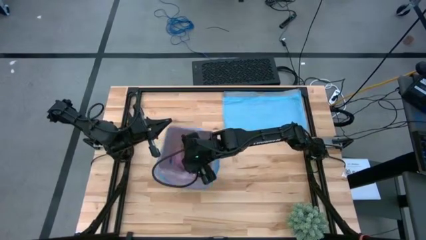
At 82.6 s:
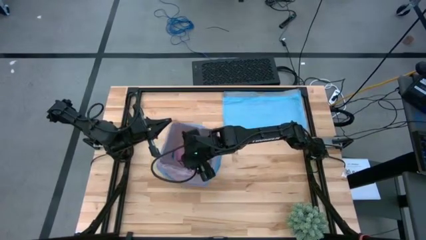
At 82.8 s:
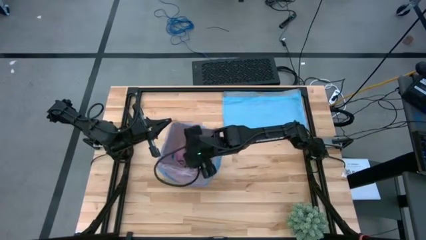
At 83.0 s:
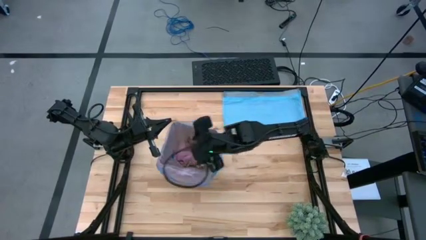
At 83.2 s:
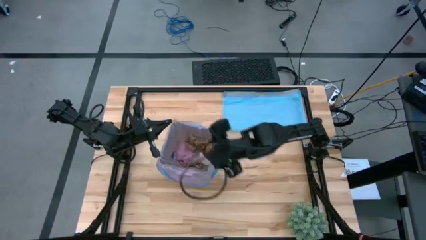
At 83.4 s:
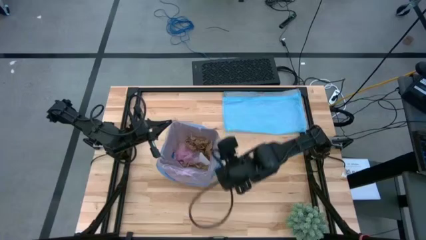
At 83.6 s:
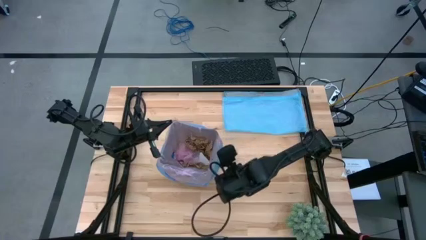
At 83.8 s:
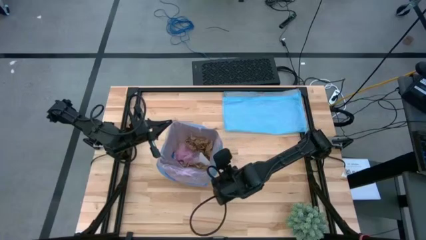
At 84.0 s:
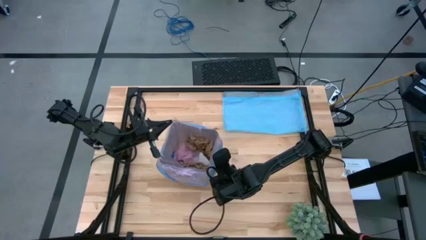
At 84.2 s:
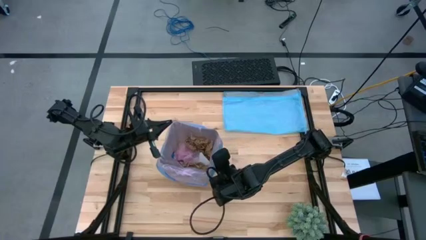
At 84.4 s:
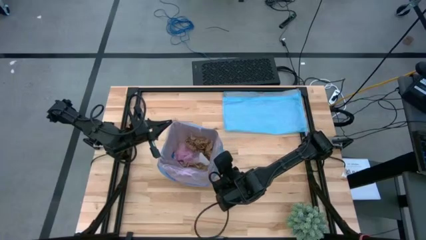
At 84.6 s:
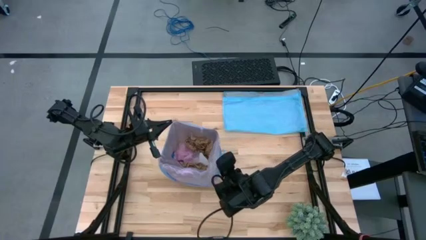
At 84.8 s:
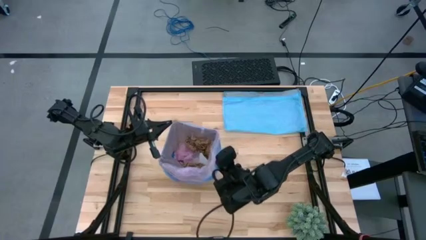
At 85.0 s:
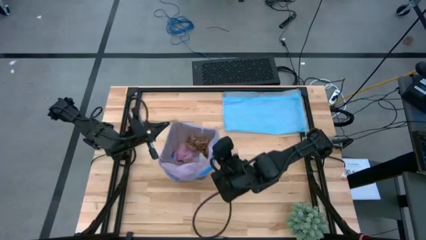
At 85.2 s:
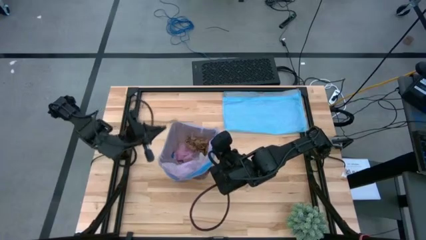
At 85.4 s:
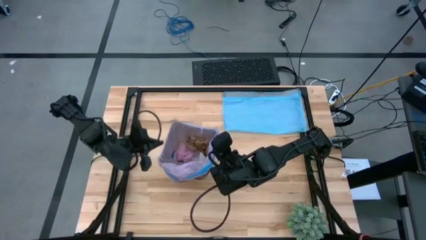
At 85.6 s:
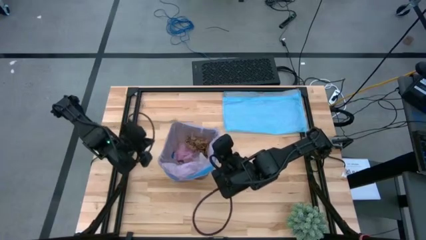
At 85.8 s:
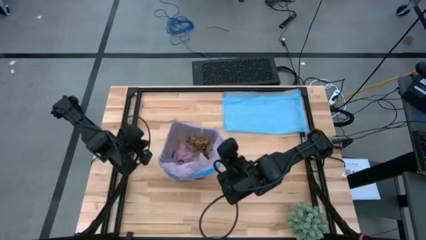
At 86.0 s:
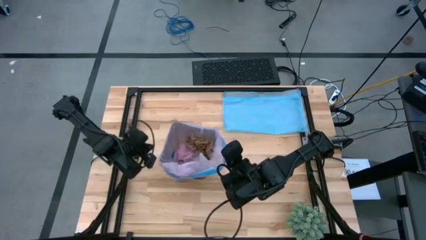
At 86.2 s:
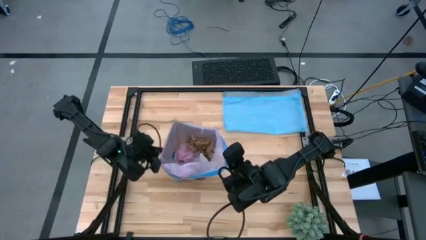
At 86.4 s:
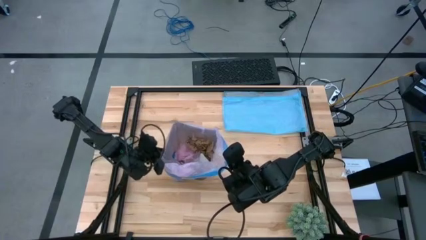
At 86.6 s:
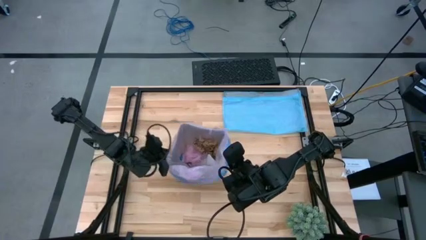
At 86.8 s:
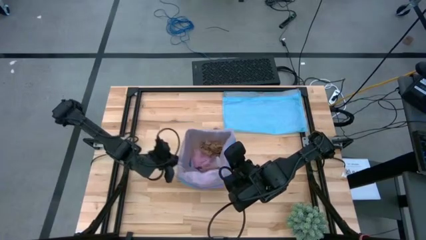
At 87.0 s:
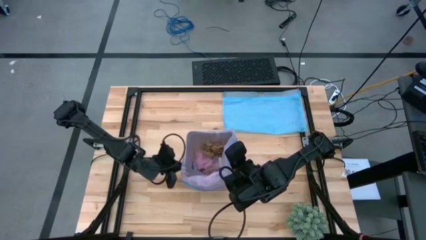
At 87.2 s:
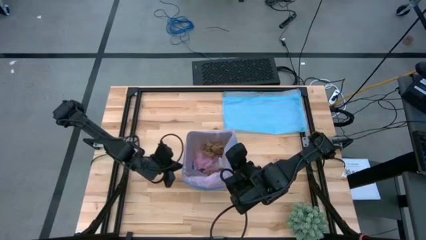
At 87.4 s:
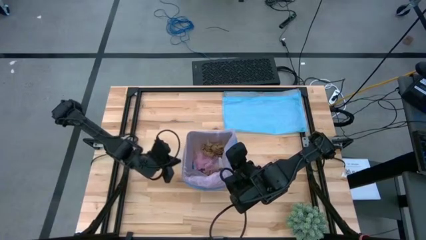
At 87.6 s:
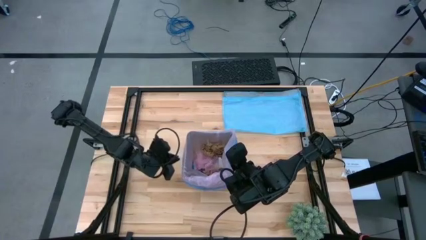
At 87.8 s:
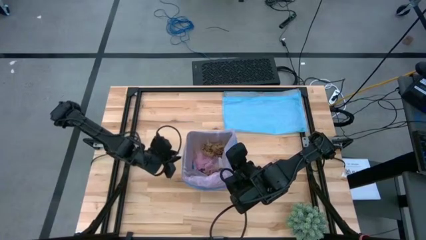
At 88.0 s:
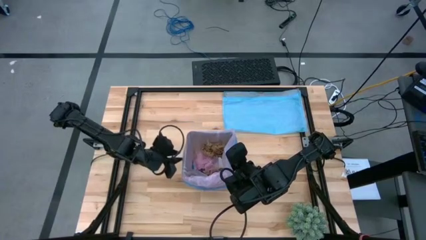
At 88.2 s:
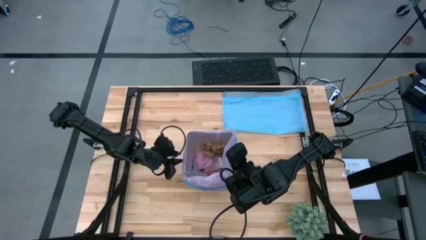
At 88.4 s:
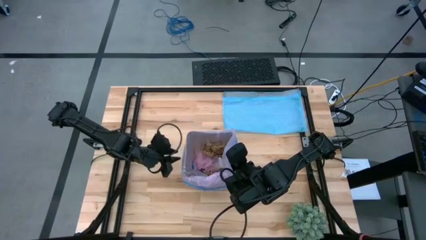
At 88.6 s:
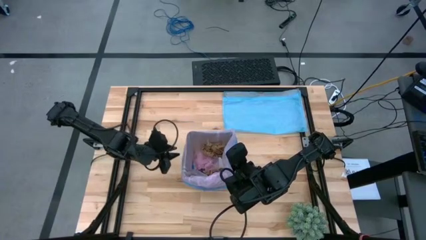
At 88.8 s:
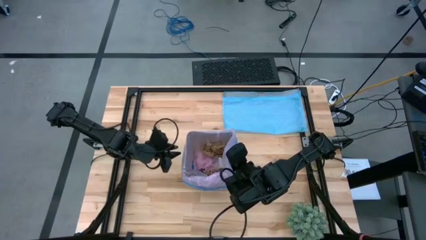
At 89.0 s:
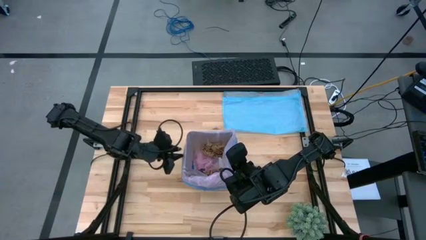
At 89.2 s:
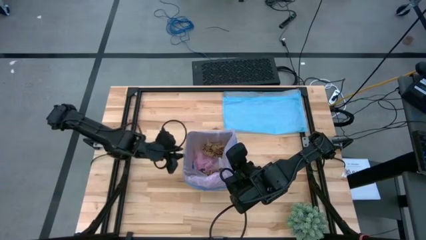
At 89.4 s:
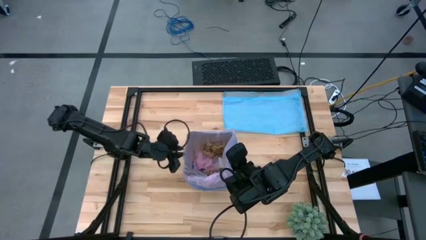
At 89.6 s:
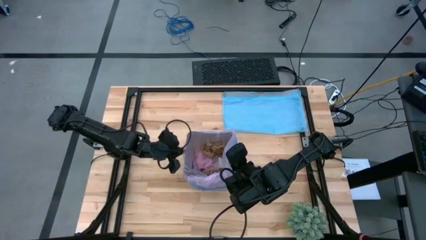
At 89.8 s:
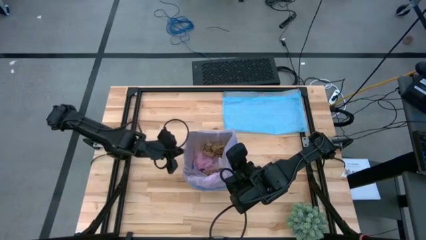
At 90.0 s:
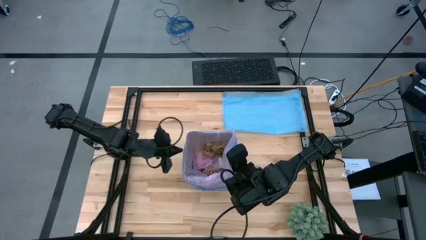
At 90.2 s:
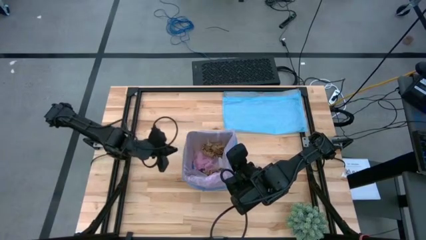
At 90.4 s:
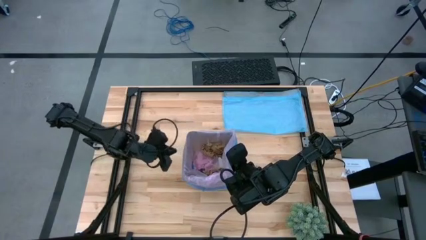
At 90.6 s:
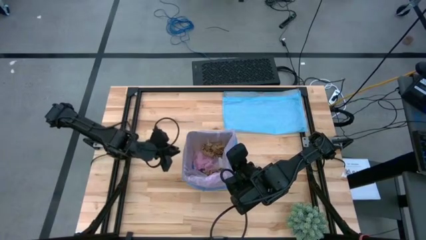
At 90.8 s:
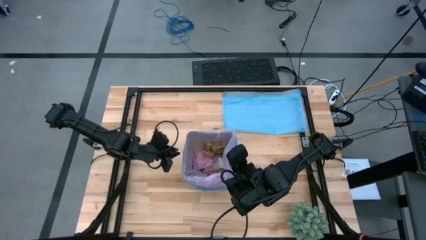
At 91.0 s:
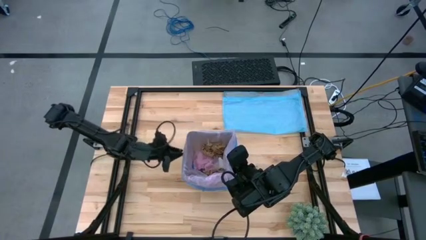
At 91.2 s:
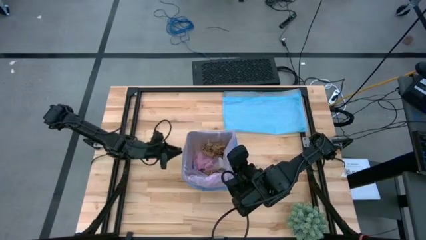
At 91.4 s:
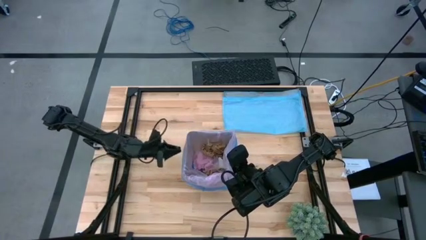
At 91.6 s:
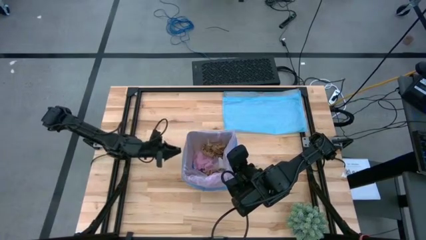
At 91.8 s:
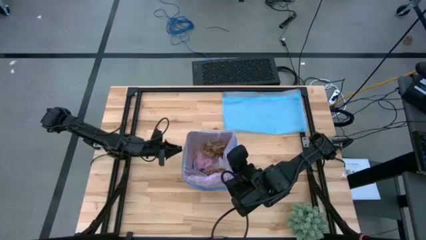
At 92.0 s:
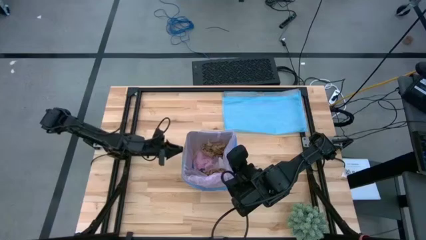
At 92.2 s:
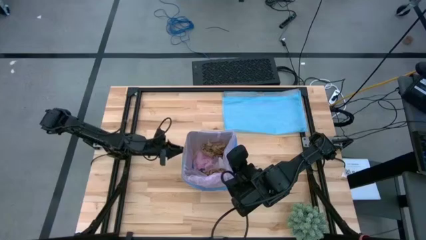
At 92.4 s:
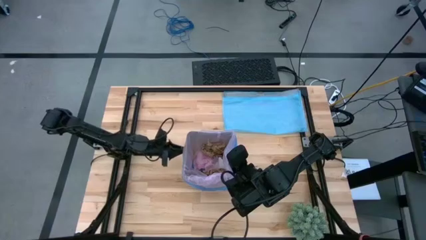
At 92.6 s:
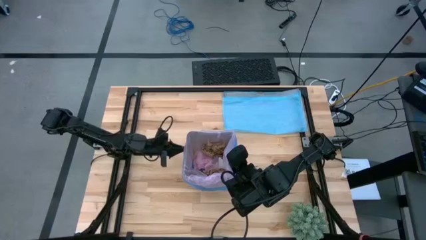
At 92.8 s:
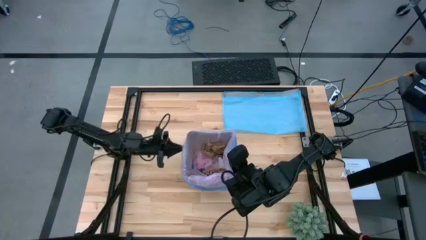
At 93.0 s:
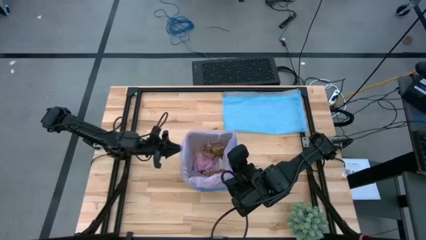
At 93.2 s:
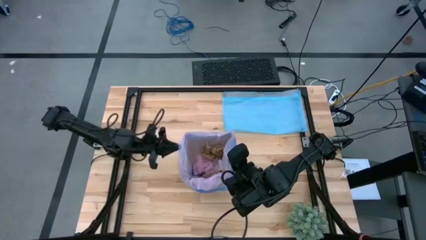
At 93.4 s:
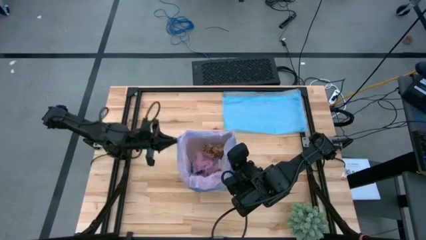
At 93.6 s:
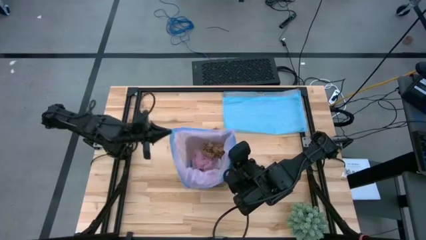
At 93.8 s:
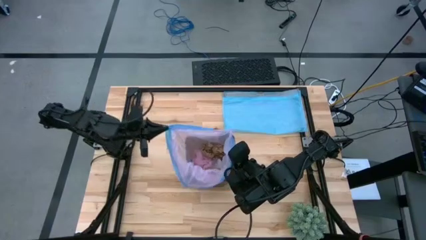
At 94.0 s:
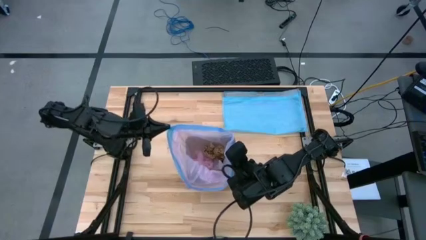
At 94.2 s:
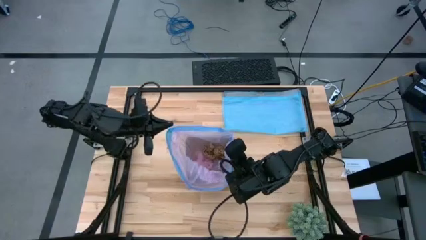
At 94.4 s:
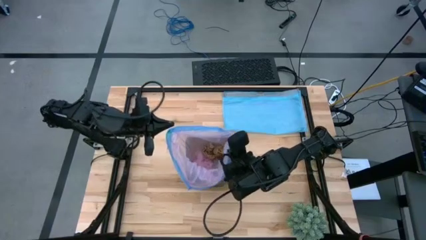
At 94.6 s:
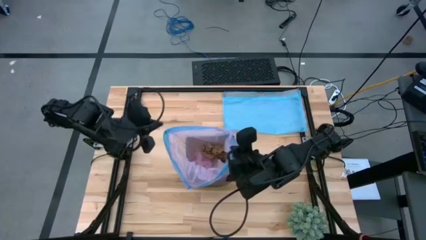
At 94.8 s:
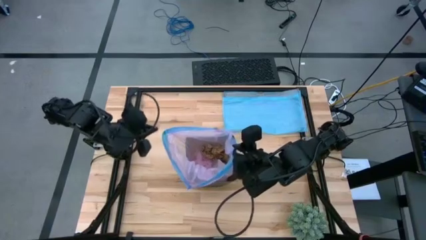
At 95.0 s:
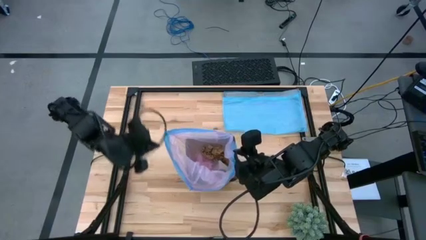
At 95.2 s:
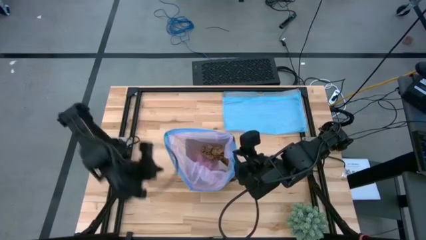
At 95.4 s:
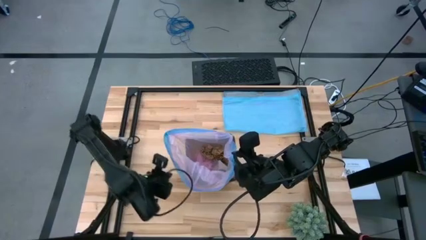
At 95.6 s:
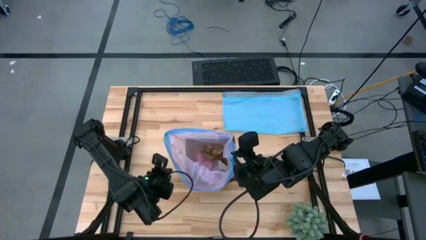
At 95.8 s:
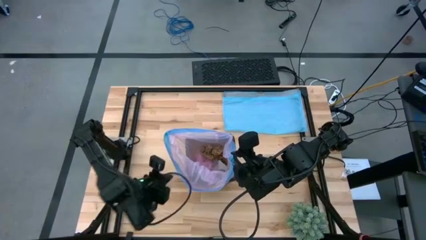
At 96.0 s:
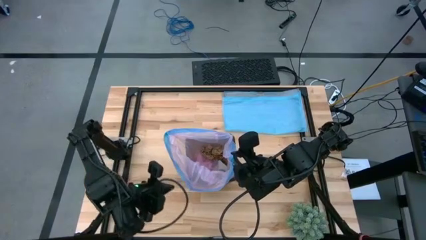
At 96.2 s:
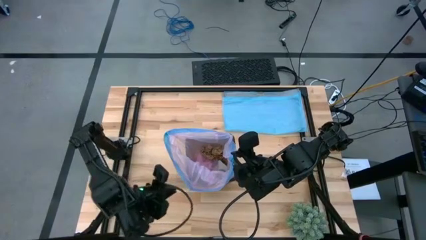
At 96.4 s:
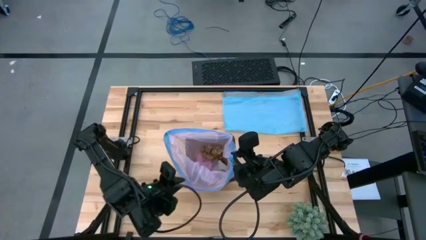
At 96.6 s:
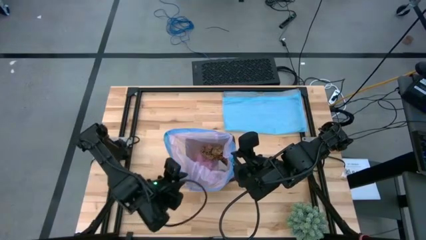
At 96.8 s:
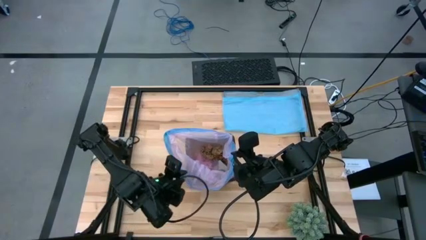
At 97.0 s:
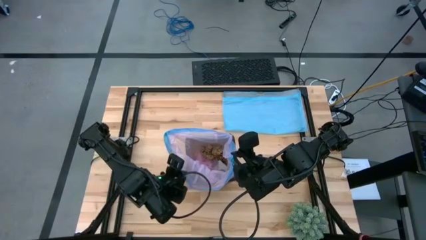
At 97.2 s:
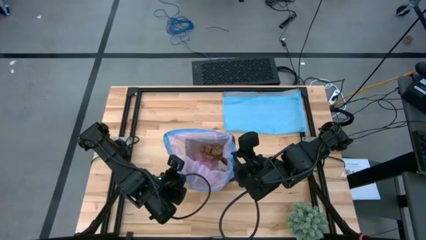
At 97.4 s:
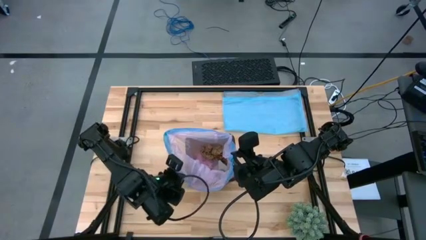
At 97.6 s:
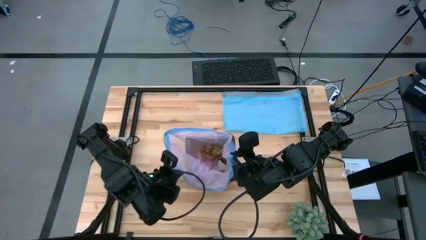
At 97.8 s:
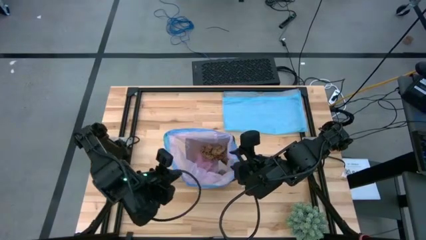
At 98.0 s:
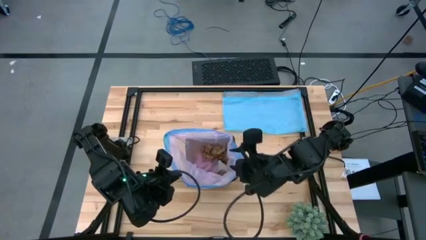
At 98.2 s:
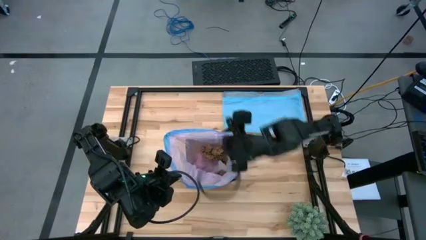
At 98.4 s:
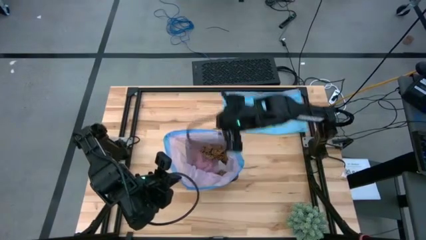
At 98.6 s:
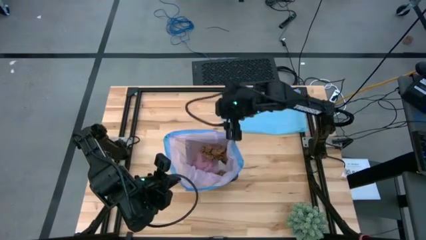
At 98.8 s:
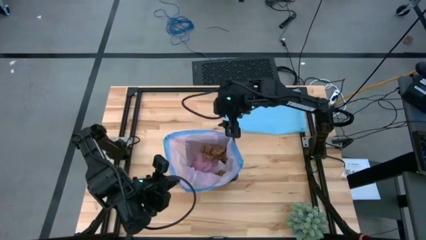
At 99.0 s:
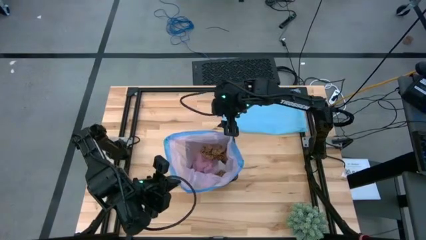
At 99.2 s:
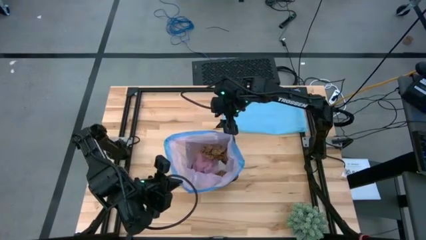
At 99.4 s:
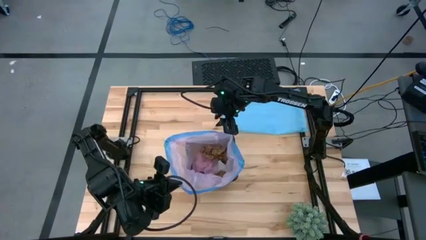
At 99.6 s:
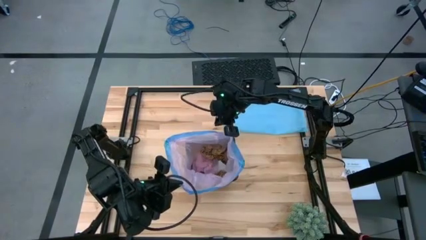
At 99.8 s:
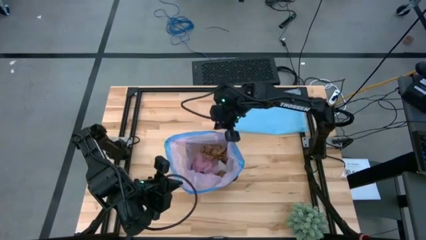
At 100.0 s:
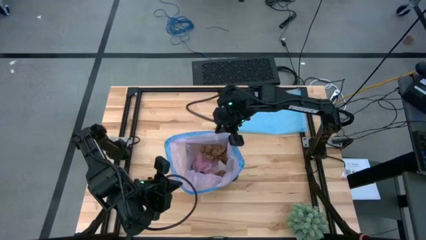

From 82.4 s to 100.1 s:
Task: place trash/remove bag and relplace
Remove the trash bag from the trash bin
